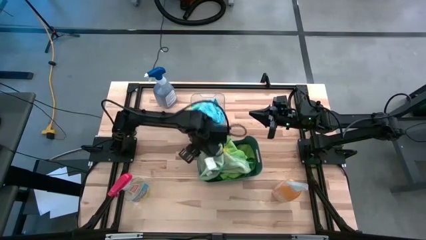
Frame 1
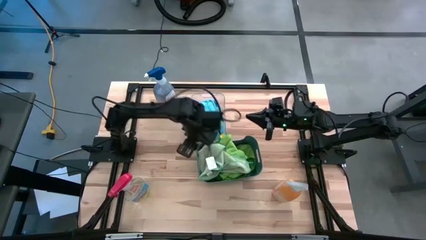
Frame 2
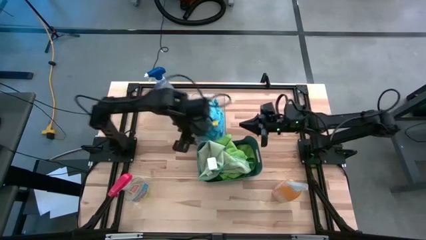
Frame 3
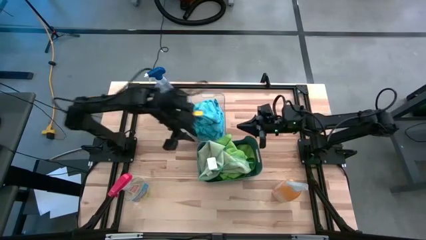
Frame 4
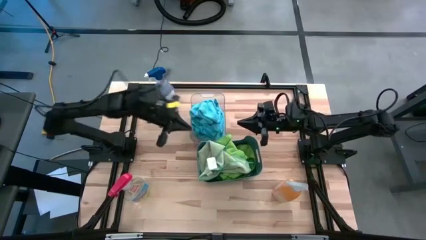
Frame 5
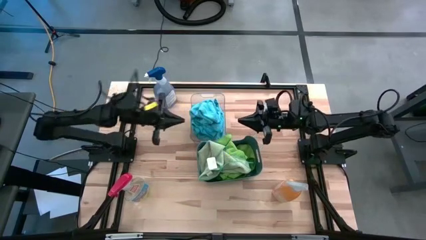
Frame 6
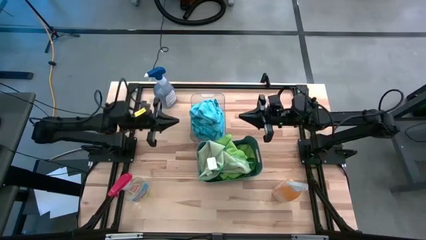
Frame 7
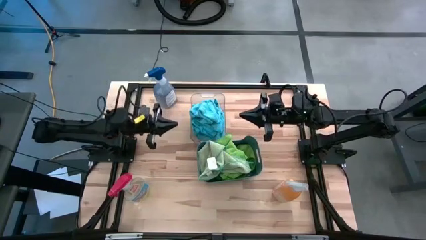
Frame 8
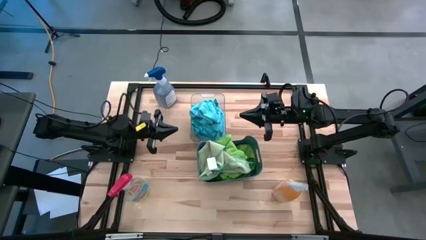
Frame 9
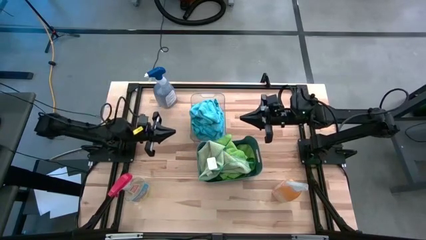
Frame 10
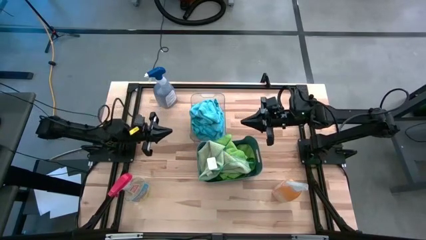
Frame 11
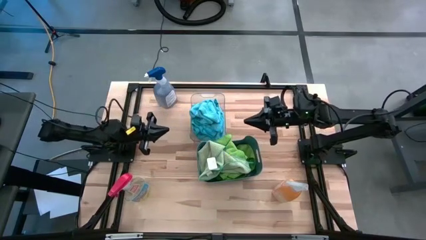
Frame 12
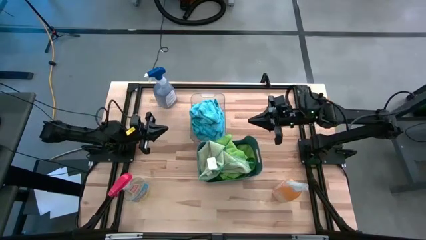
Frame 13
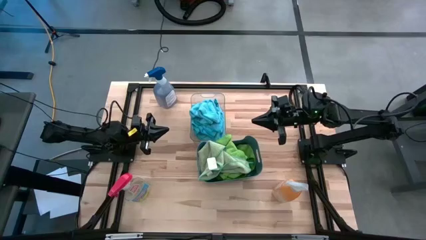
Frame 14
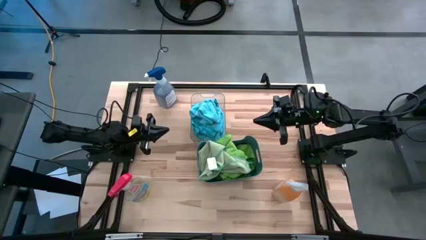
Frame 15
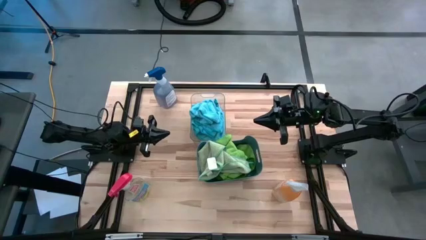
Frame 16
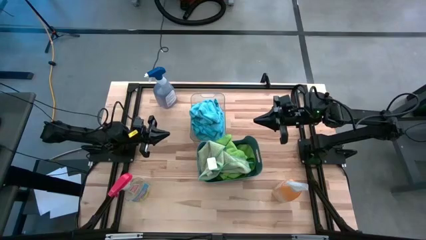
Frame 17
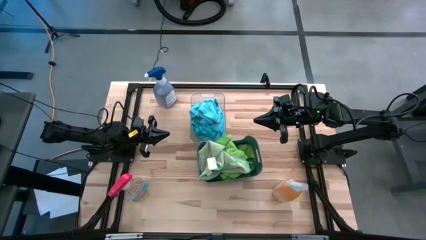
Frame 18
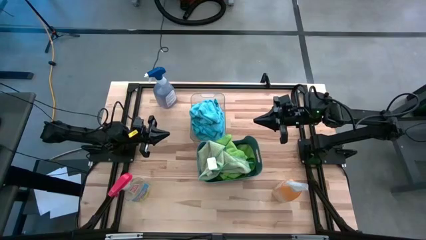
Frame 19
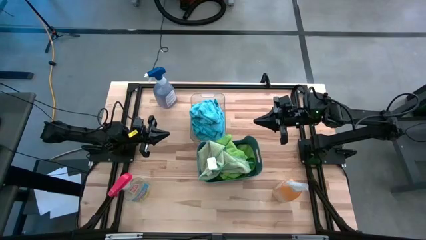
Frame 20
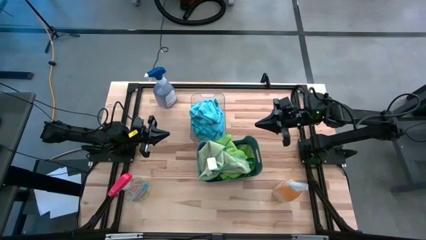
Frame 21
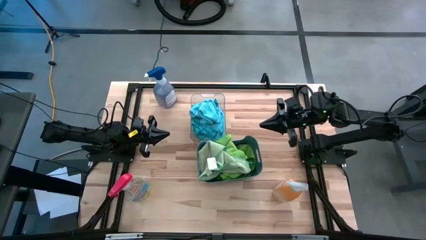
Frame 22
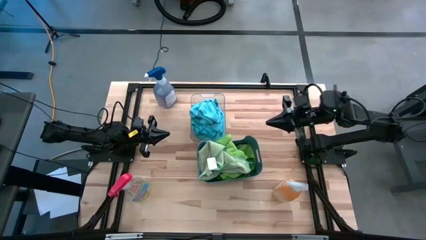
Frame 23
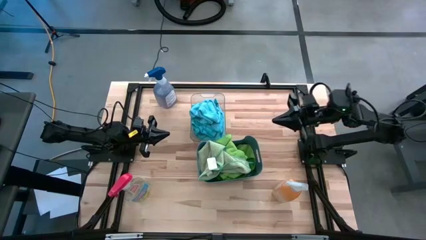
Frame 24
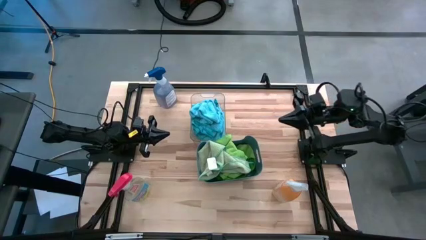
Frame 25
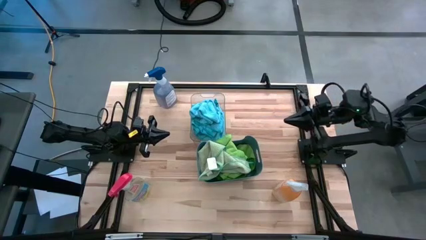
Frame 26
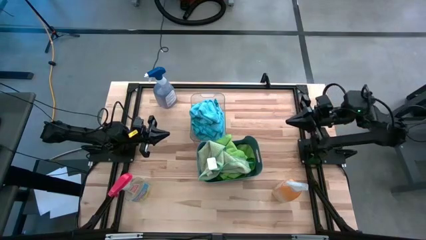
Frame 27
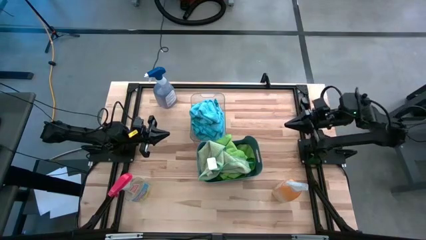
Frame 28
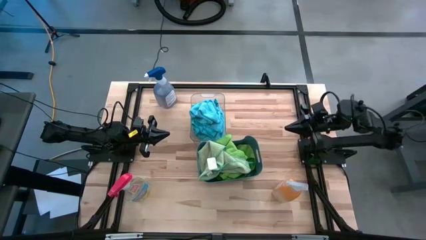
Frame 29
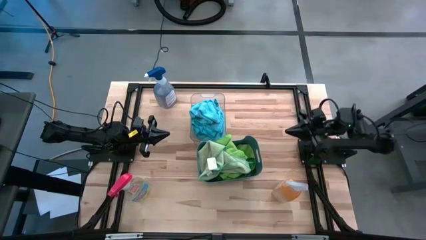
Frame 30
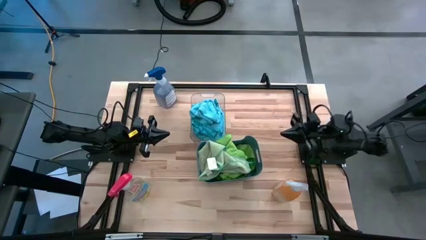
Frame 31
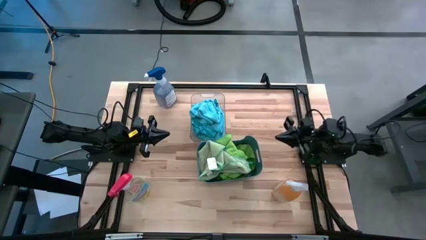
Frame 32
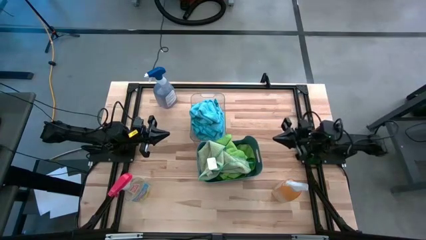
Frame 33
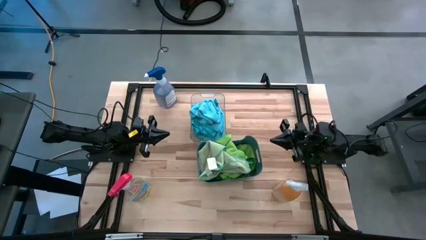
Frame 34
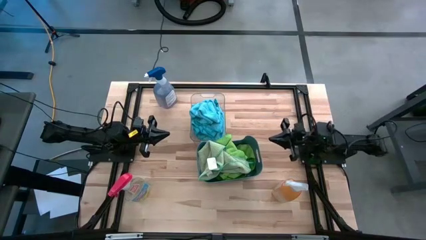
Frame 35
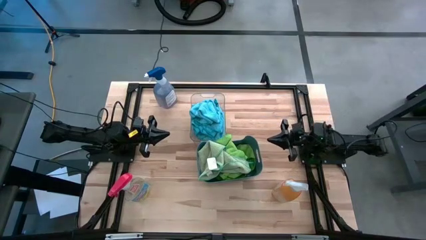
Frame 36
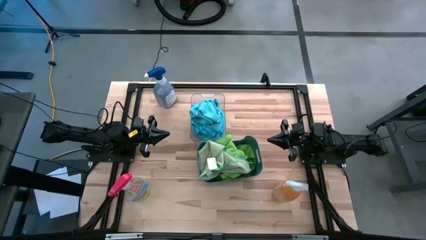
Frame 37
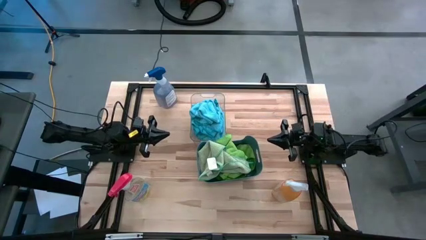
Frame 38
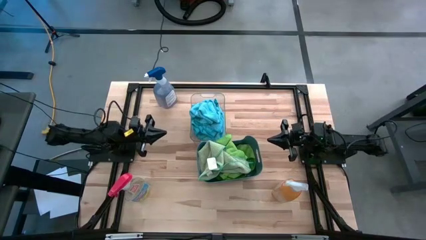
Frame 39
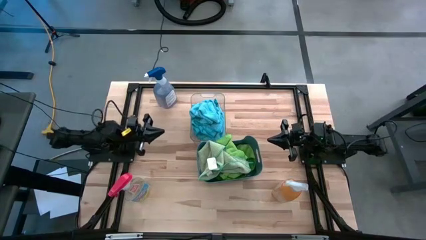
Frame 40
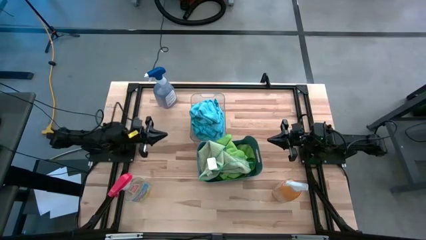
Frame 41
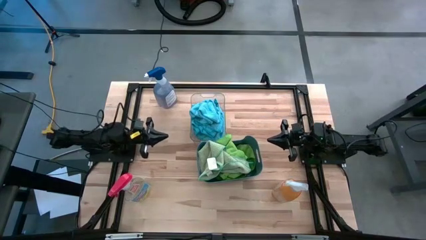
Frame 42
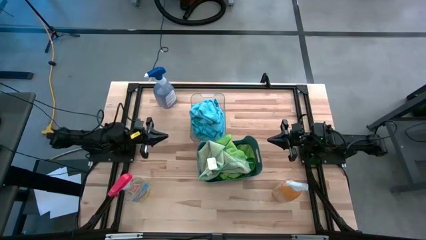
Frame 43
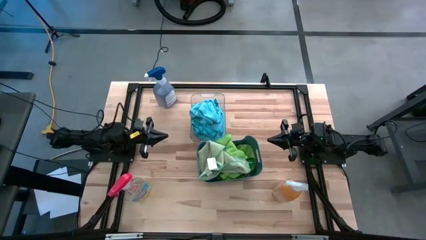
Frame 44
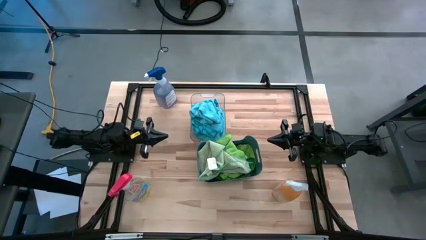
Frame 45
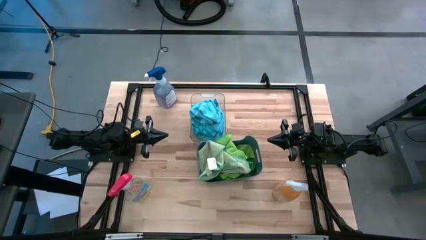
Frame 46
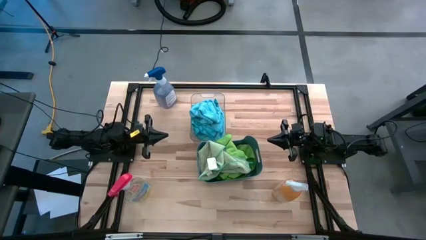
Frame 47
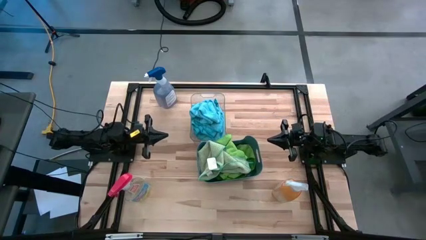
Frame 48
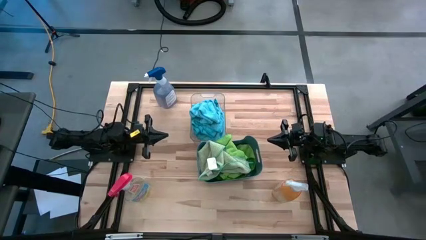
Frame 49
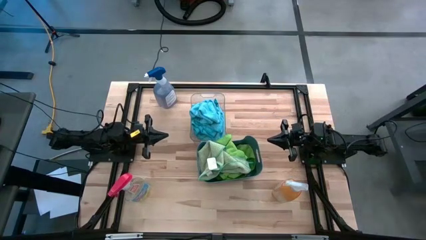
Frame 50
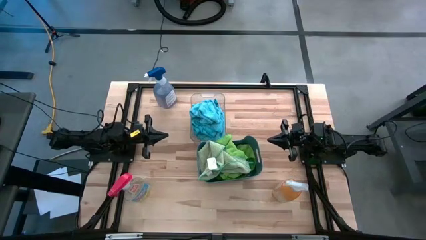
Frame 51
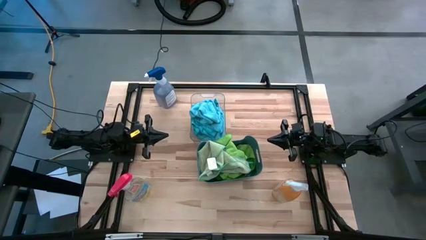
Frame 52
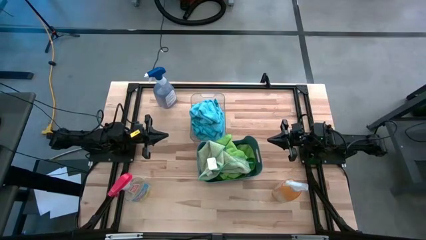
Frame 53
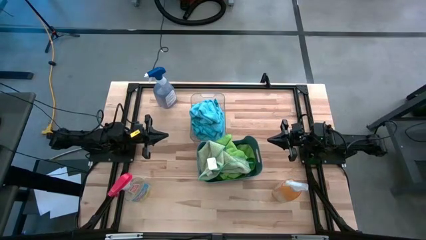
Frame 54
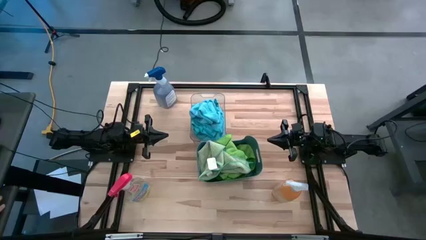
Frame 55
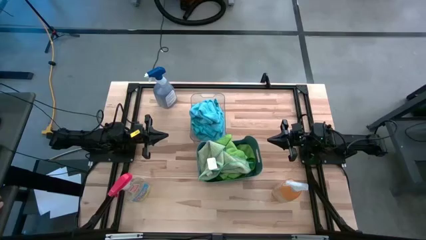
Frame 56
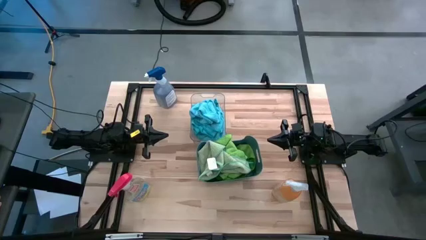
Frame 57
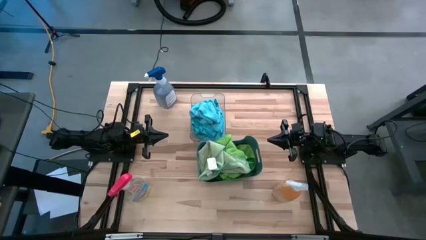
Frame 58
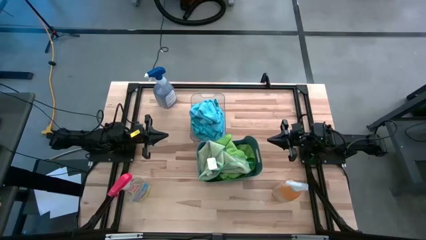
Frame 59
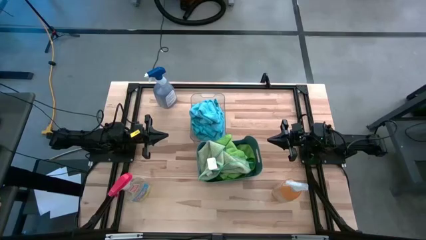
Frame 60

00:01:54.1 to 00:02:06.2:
Task: Sort microfiber towel by color & place in baskets
Return to Home Position

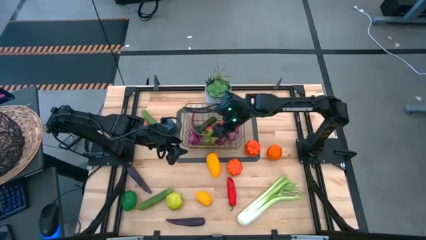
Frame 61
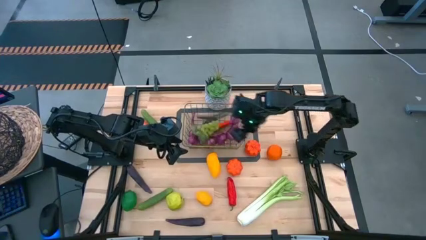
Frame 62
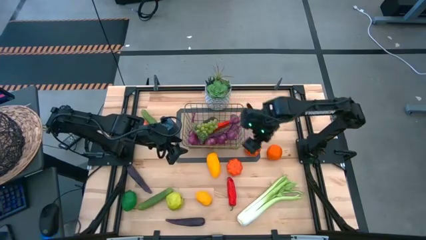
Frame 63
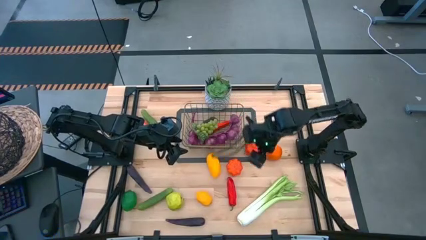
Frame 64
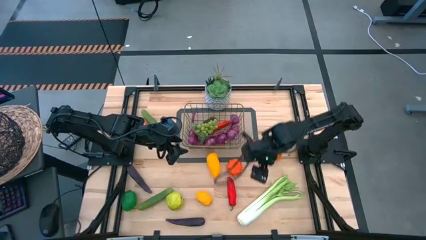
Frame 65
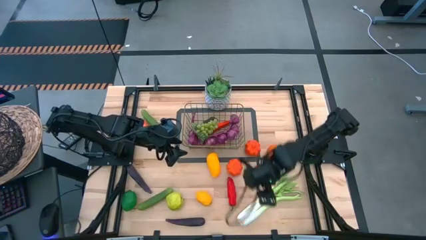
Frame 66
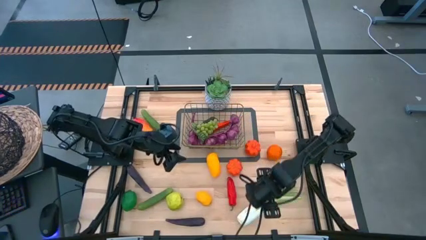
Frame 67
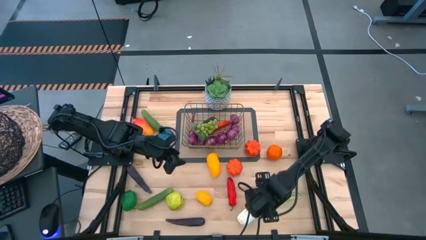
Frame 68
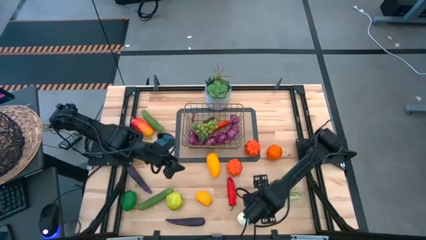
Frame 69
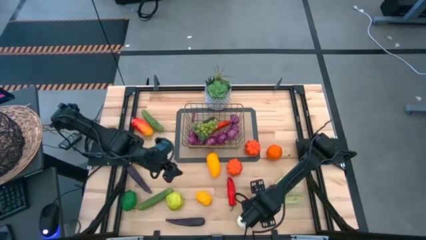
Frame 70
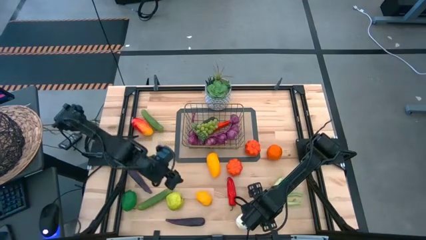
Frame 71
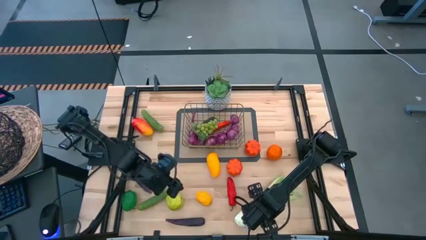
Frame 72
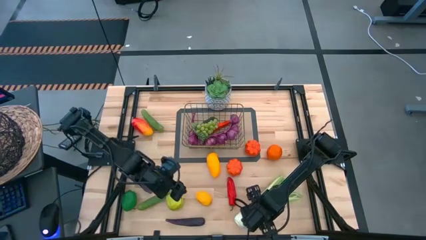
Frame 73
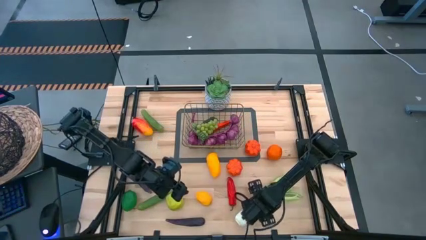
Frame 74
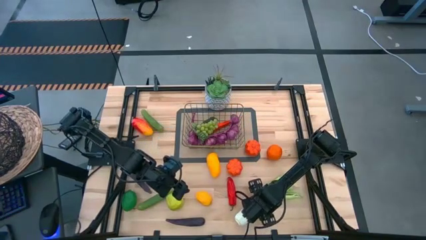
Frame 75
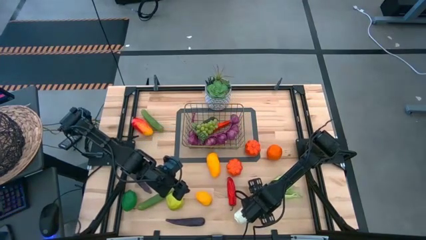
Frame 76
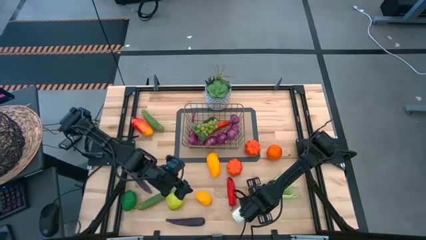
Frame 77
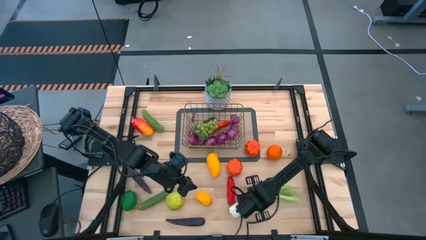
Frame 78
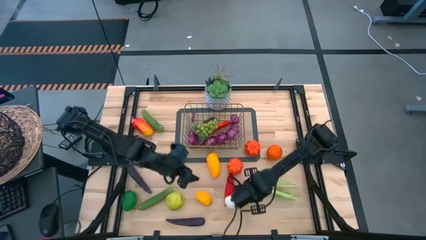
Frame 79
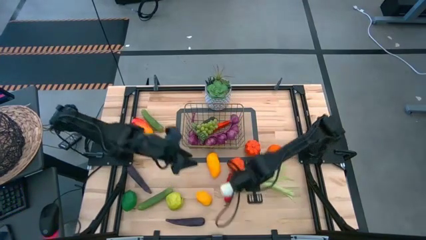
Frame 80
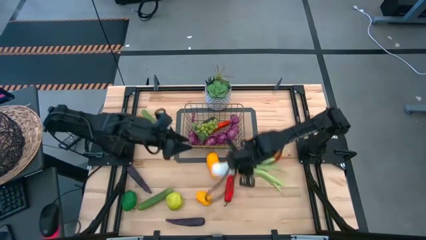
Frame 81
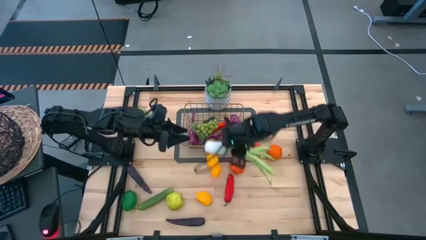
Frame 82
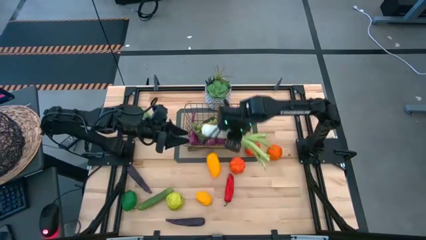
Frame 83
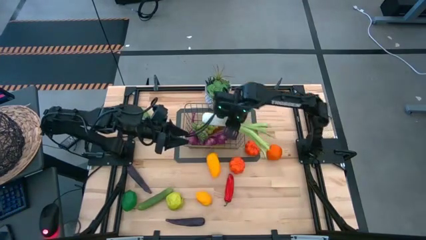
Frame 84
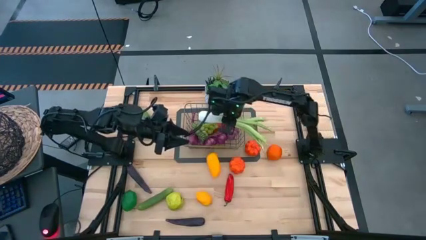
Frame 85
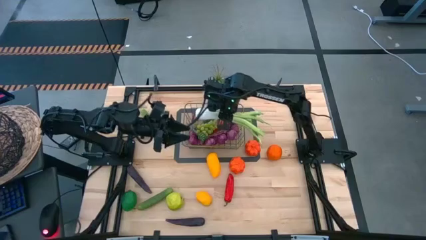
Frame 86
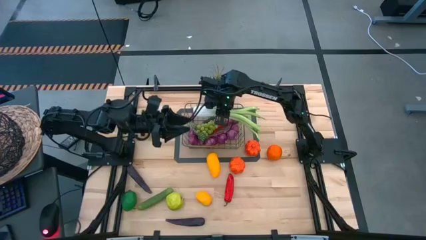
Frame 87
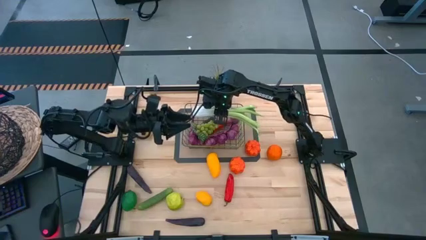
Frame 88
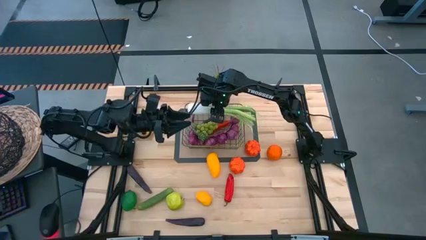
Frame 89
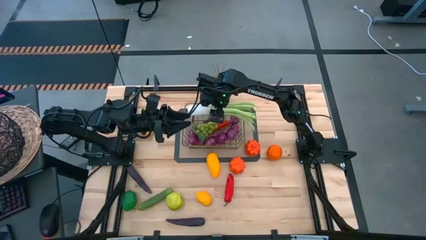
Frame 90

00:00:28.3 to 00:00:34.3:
Task: Build produce basket
Put the green chinese cabbage into the wire basket
